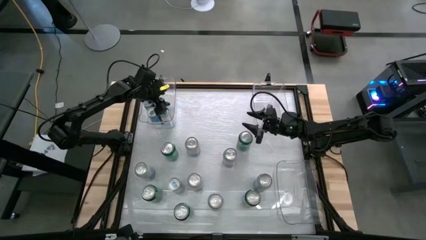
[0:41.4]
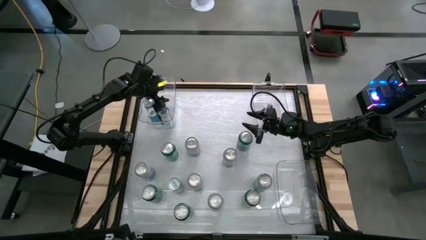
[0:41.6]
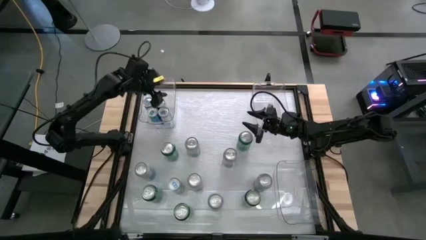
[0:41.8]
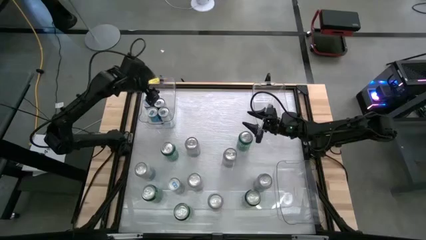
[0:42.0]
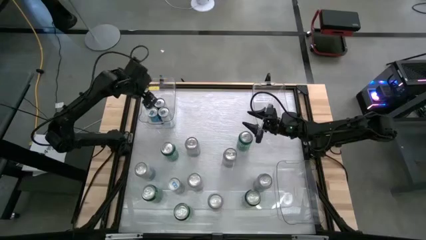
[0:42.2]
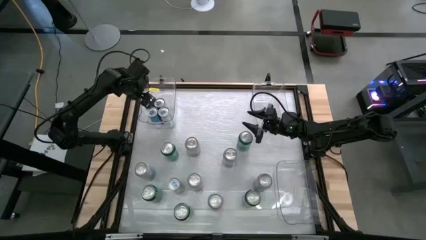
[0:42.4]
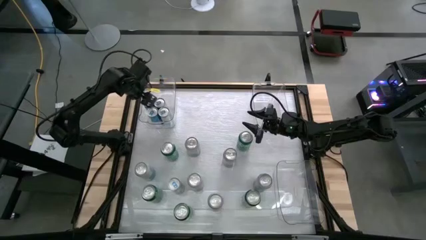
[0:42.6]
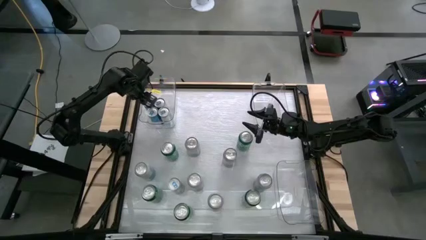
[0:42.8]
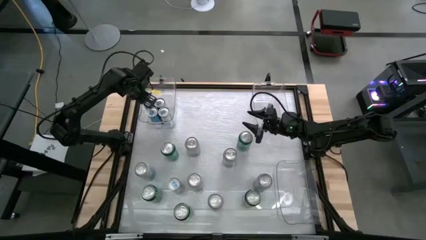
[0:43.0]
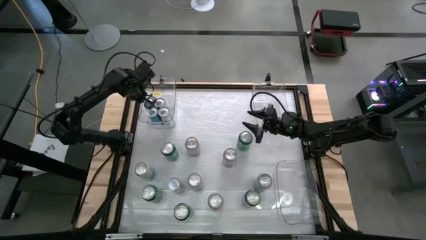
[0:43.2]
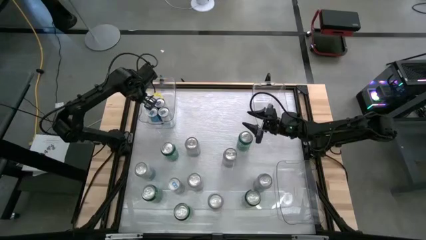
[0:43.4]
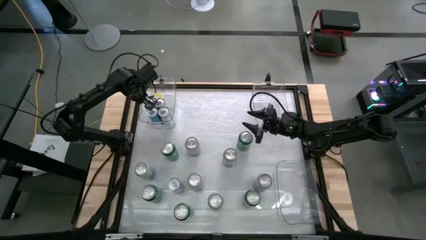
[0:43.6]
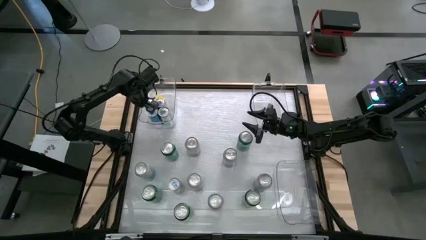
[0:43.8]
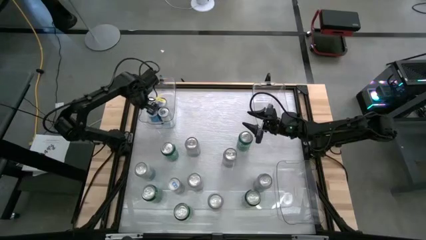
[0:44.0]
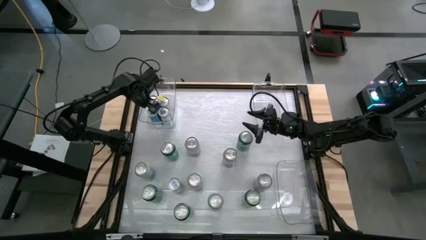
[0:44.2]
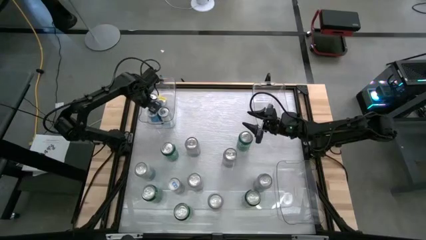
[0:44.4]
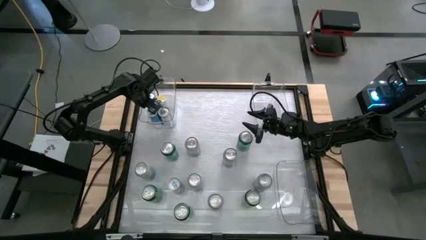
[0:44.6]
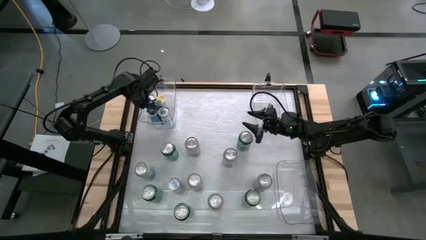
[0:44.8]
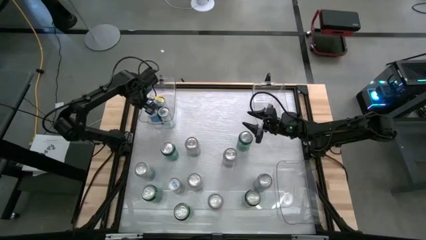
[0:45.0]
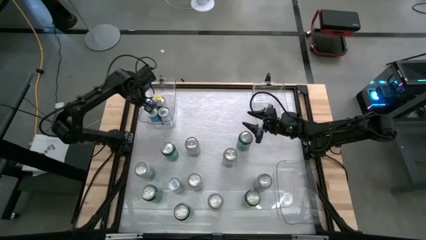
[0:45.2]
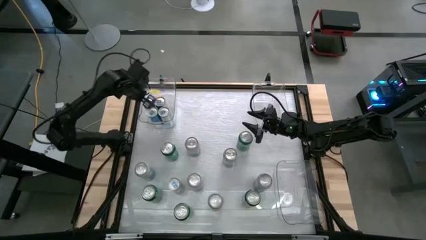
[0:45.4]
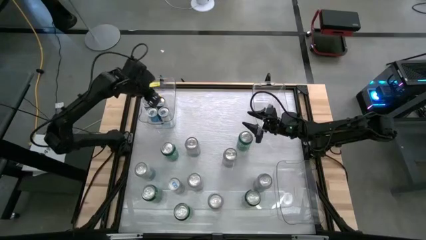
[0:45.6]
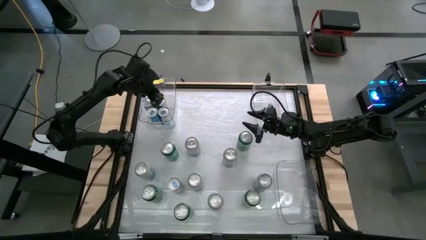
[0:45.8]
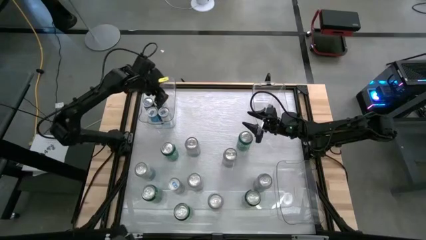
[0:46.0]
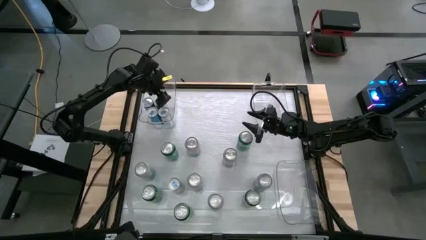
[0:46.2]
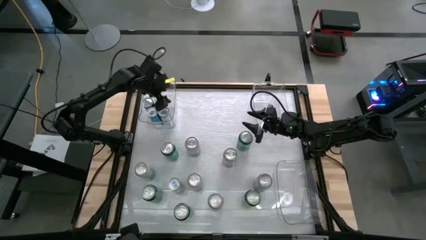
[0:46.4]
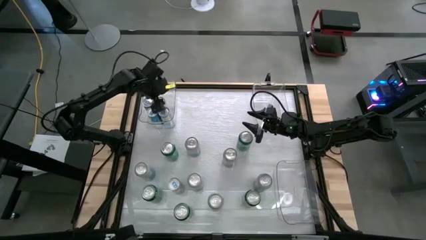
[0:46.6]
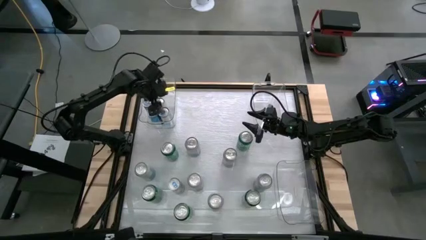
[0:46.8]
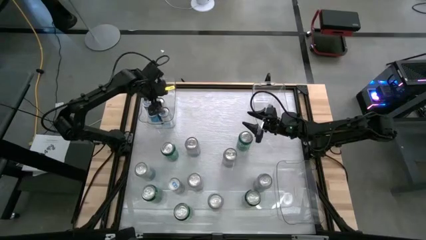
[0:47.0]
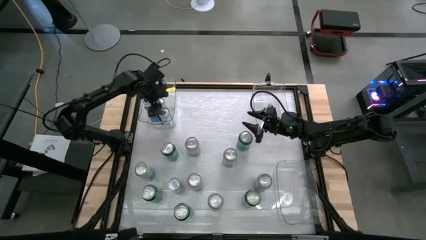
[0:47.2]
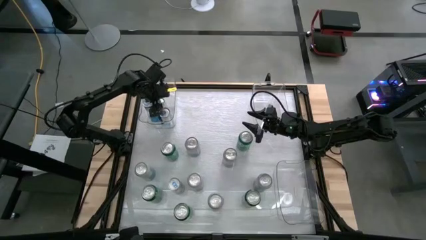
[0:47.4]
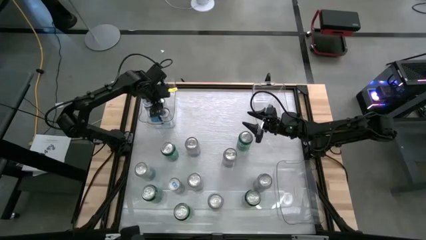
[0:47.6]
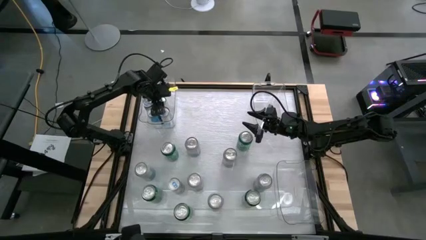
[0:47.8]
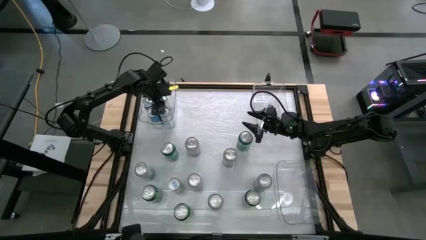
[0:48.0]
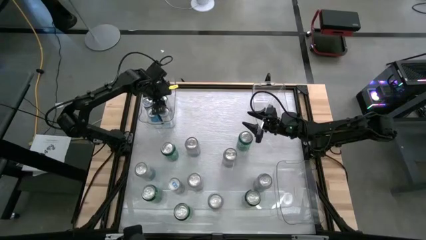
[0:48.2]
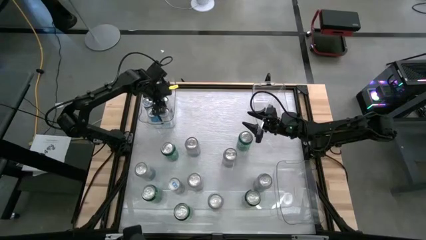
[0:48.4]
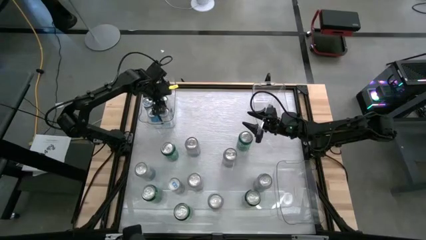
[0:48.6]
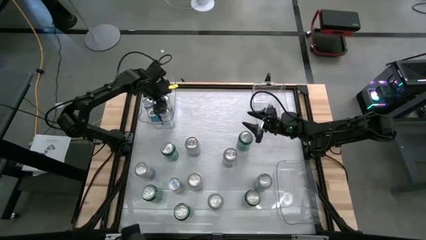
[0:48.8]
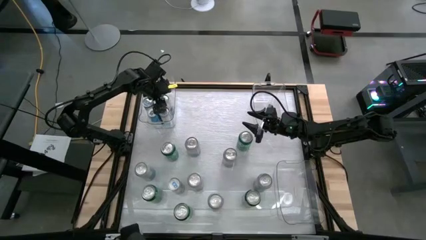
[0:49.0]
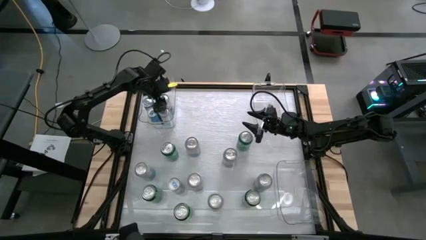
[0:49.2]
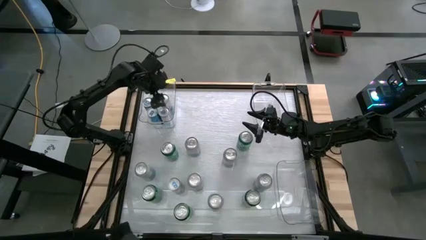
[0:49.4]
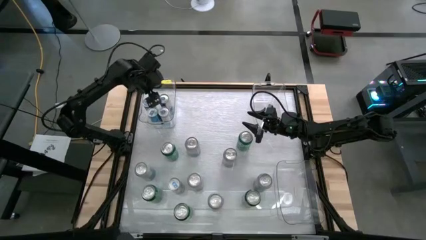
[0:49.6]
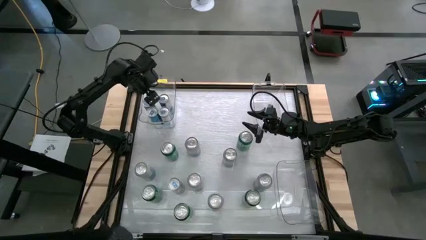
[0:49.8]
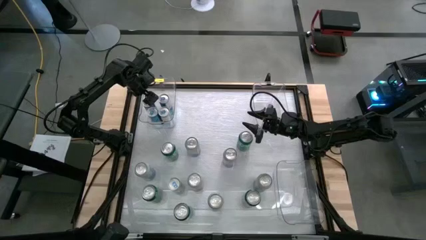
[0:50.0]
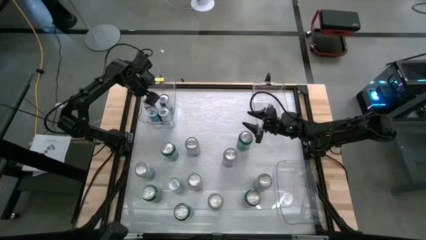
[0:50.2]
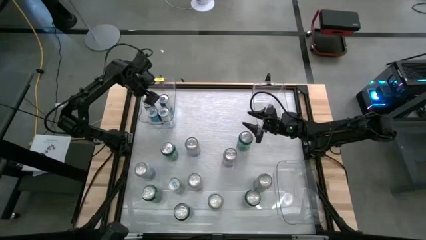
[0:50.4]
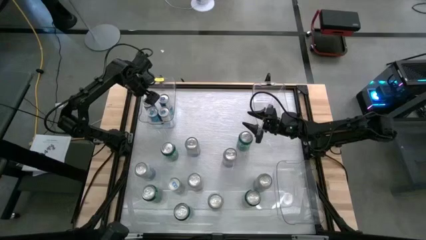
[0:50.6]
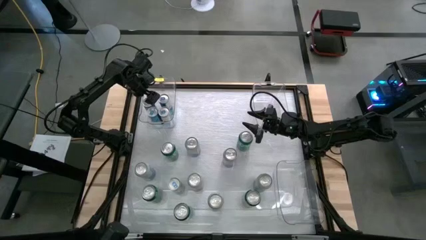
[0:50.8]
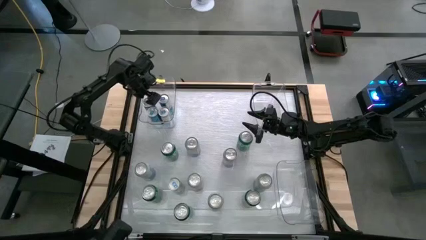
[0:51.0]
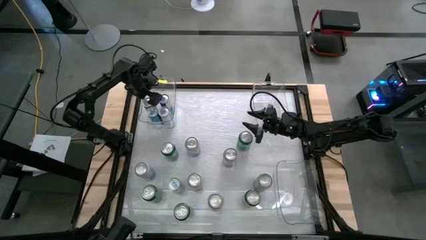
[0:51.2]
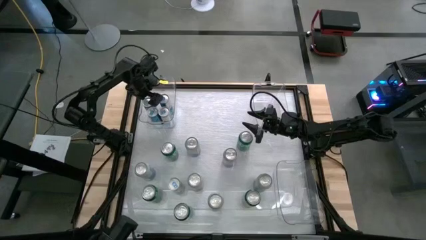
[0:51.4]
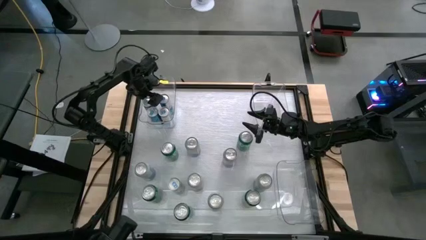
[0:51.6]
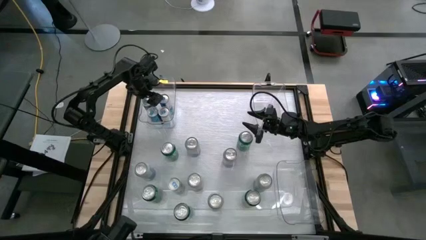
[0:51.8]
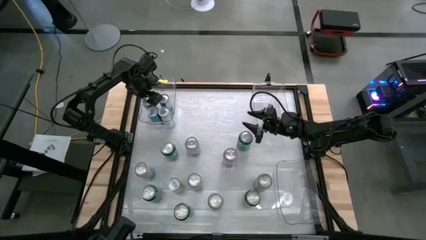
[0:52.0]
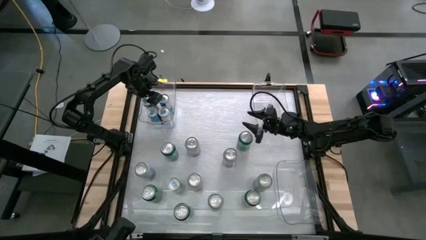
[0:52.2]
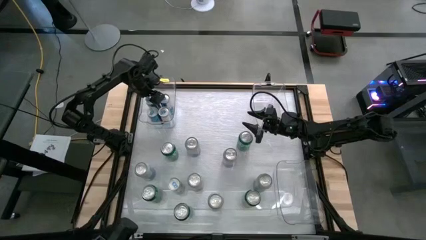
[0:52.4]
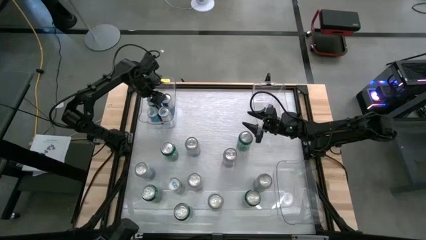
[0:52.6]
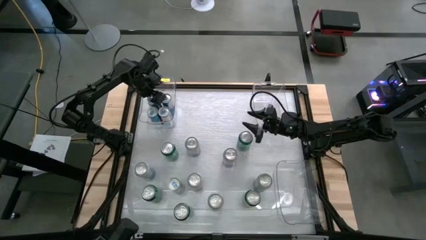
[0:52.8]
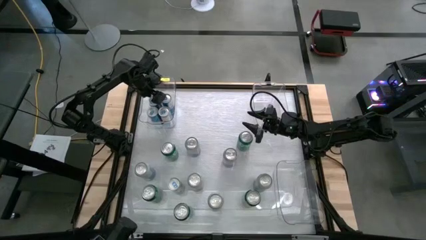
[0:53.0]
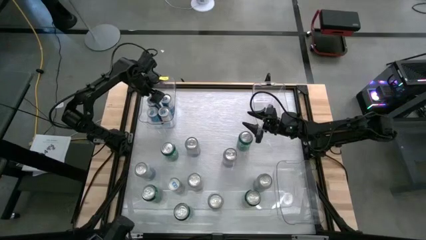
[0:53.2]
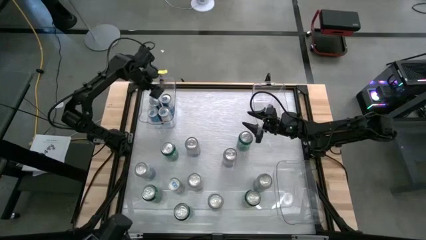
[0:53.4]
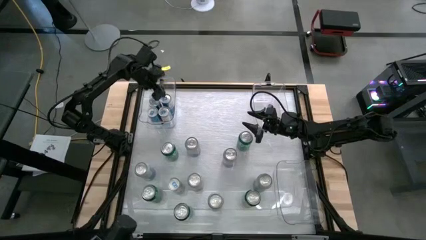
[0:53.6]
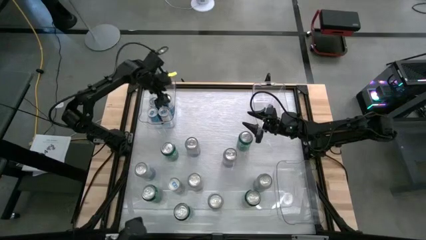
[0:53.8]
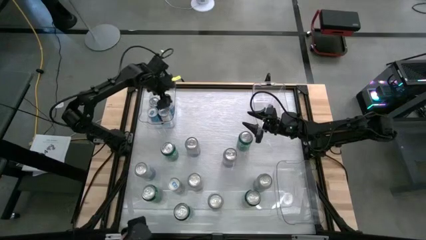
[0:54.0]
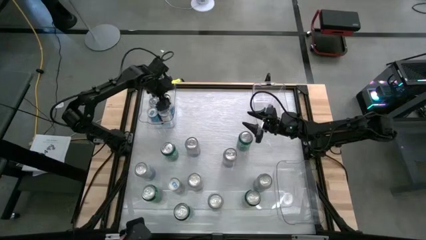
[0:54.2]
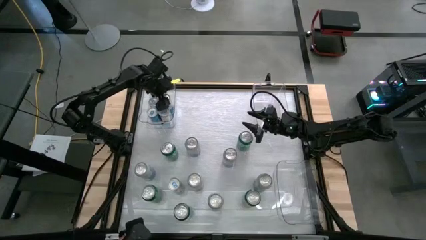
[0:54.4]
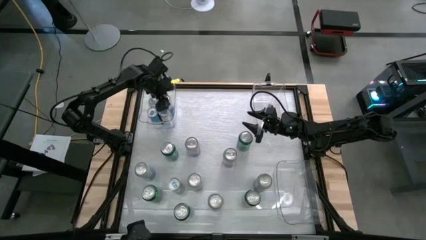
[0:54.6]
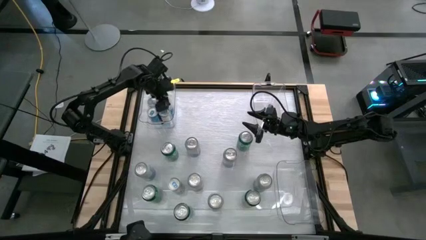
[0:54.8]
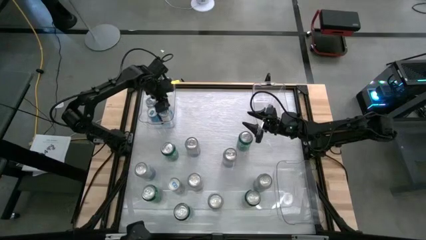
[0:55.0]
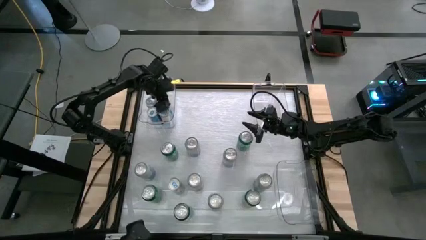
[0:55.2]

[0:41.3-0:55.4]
Task: Sort soda cans
Adjust the blue soda cans in the top left transparent bin
